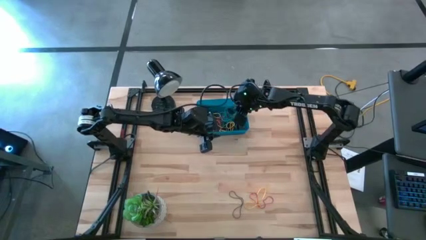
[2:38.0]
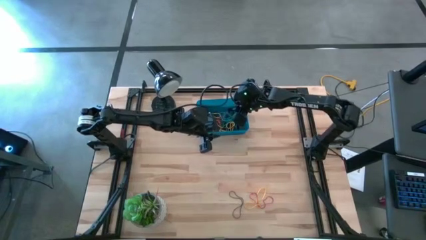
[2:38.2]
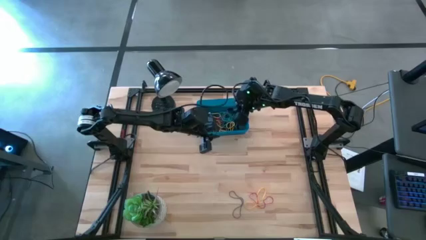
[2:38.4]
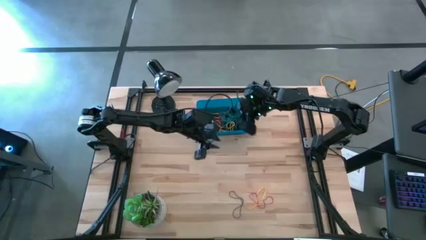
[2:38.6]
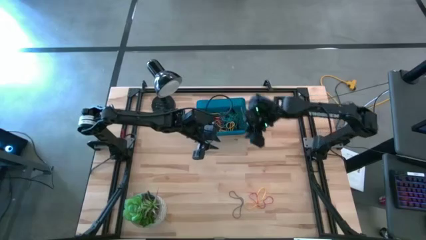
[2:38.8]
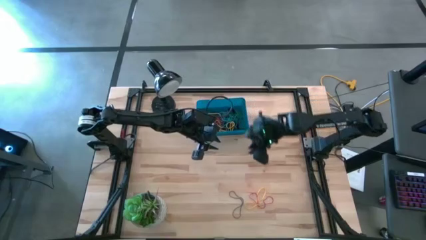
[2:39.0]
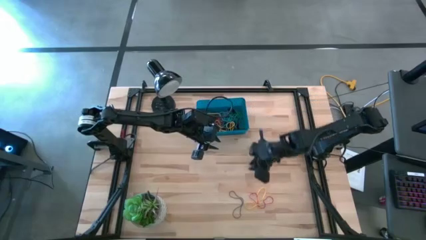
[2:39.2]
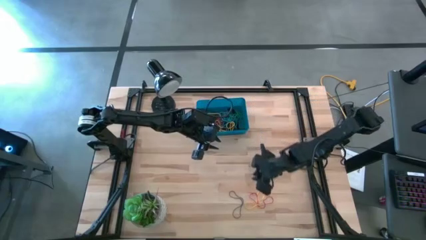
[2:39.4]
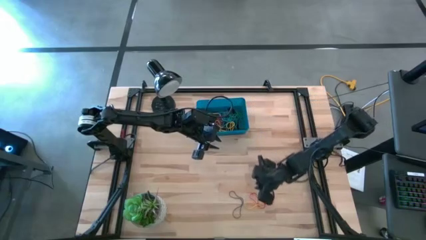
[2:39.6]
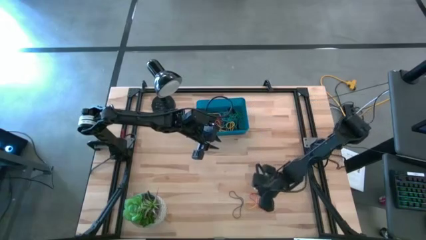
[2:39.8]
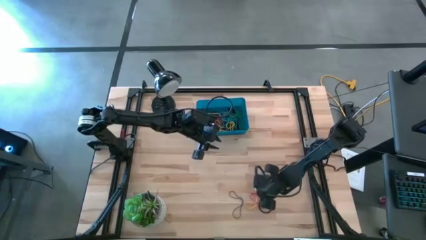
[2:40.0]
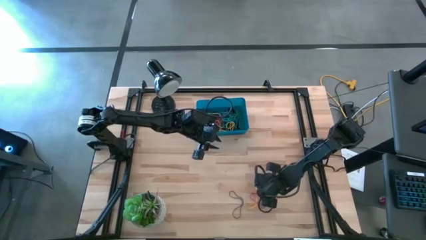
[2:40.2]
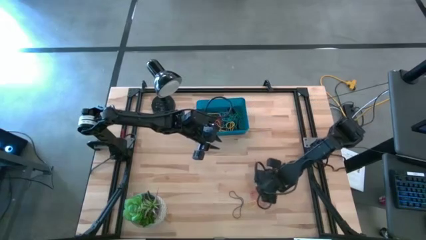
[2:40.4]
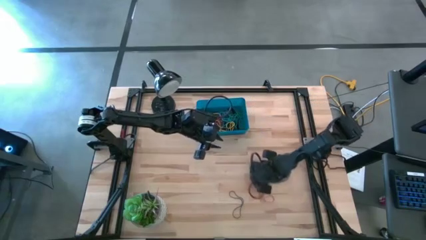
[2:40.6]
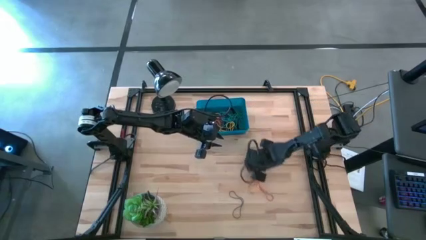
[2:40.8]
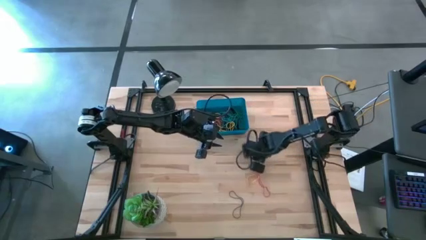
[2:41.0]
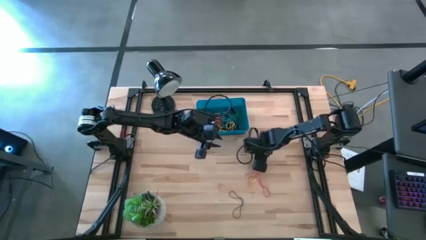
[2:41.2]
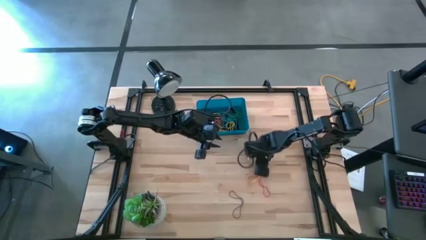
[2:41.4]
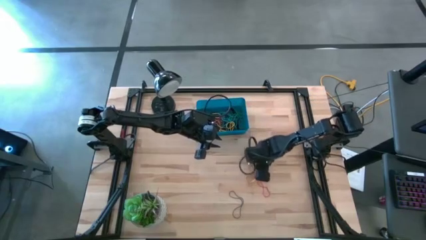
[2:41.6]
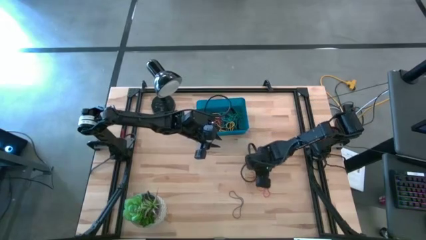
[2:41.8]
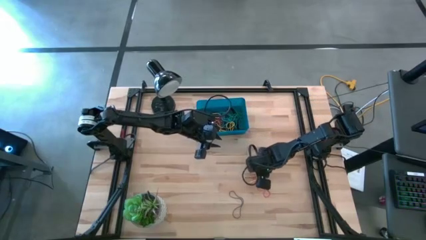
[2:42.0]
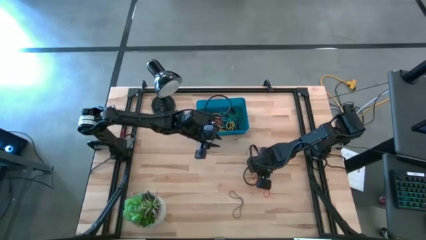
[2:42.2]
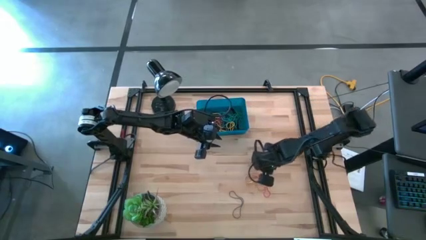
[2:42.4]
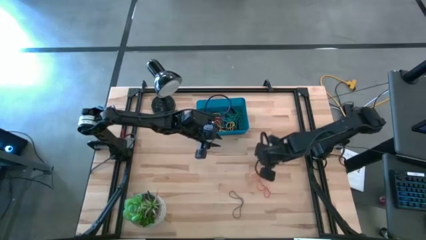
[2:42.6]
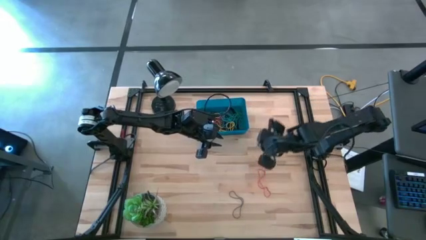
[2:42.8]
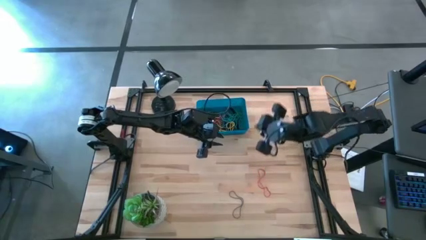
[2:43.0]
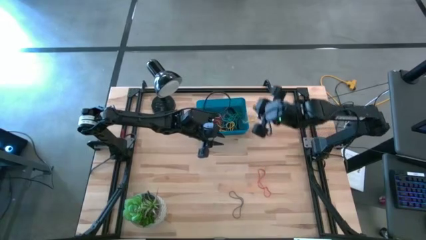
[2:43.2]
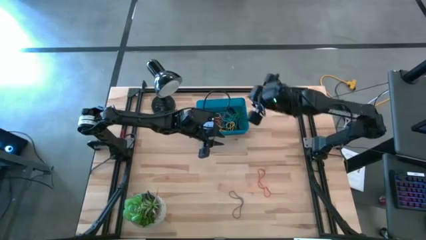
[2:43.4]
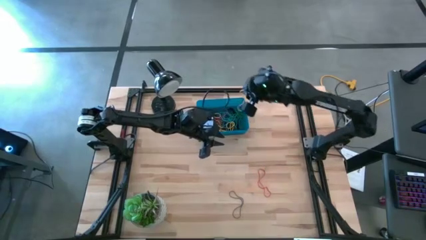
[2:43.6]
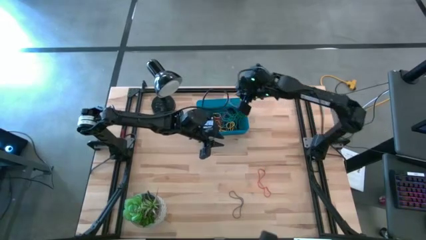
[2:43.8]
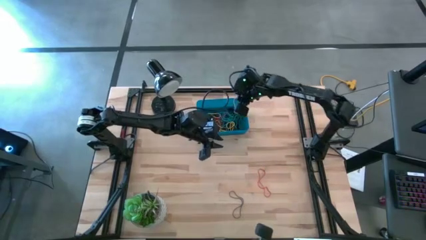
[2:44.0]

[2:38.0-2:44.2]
Task: Pick and place rubber bands into bin
Put the yellow rubber band into the blue bin

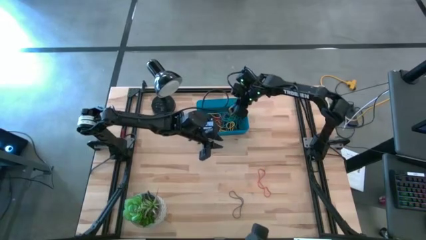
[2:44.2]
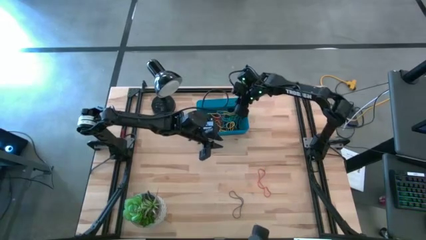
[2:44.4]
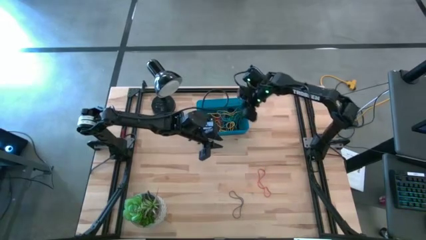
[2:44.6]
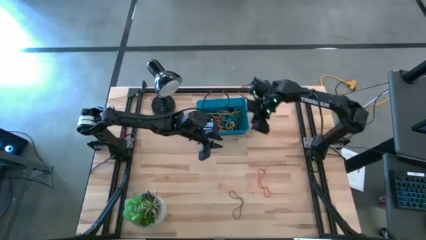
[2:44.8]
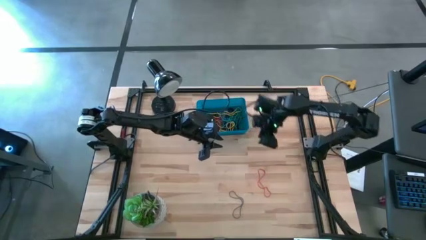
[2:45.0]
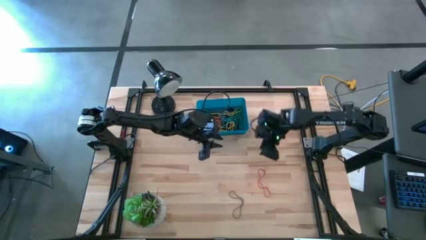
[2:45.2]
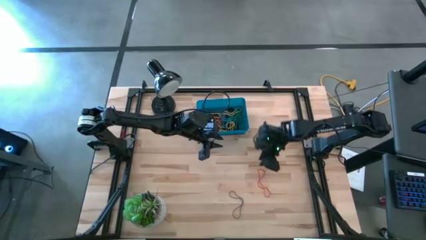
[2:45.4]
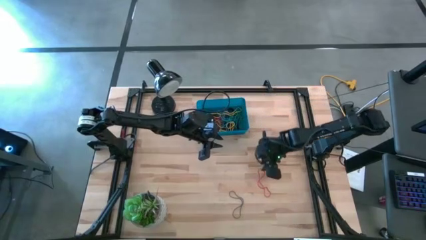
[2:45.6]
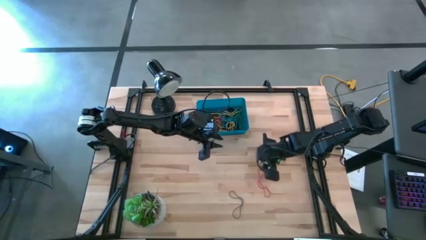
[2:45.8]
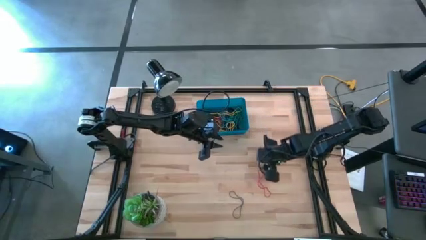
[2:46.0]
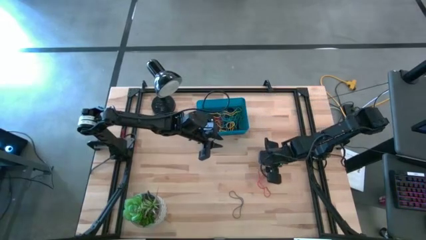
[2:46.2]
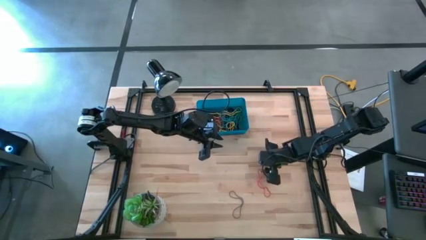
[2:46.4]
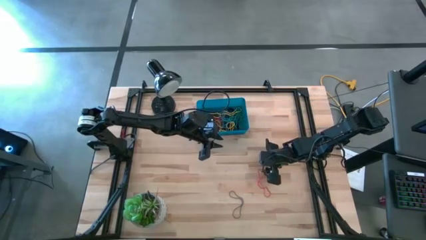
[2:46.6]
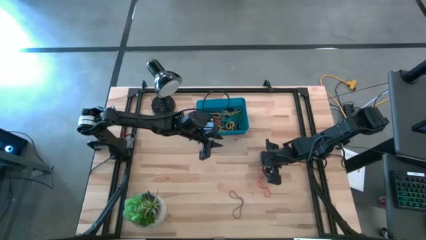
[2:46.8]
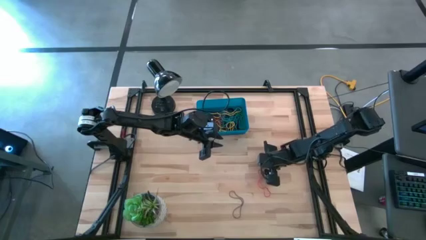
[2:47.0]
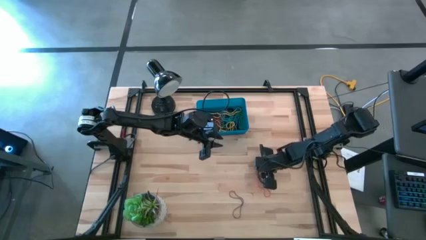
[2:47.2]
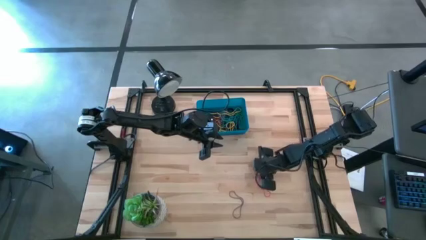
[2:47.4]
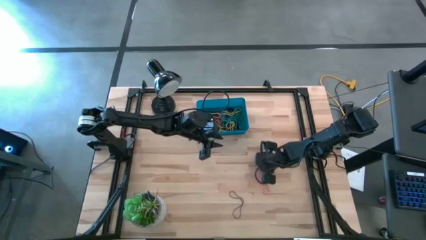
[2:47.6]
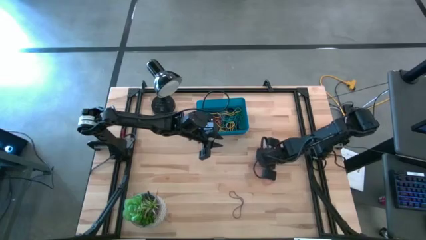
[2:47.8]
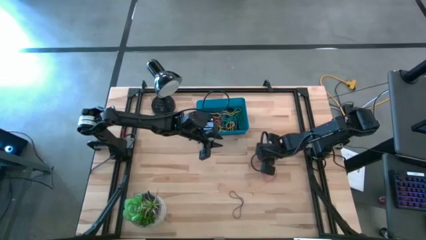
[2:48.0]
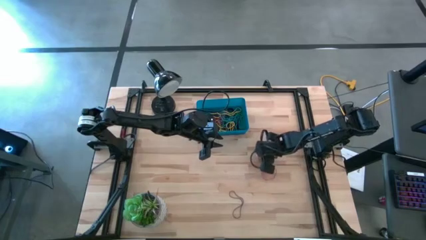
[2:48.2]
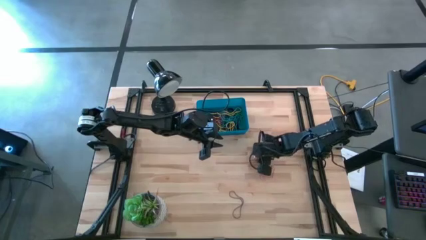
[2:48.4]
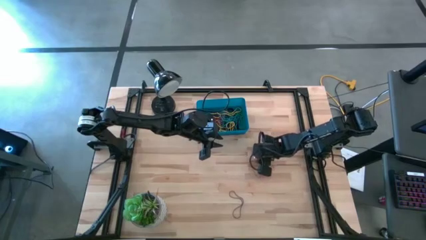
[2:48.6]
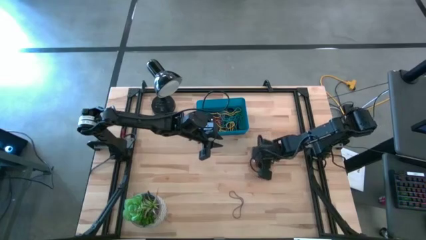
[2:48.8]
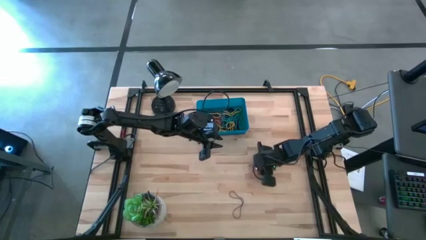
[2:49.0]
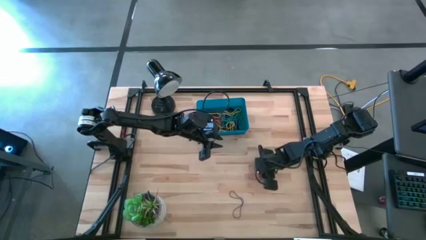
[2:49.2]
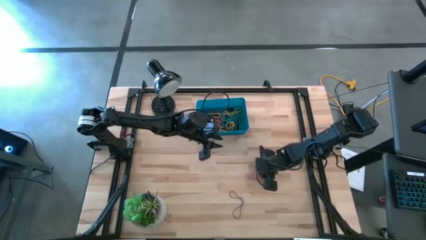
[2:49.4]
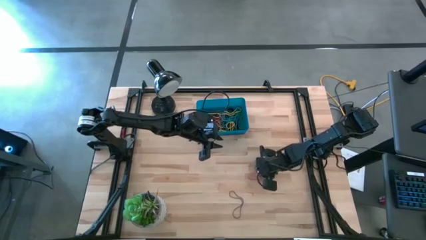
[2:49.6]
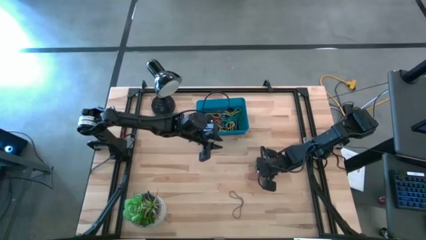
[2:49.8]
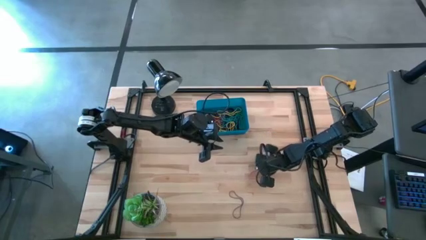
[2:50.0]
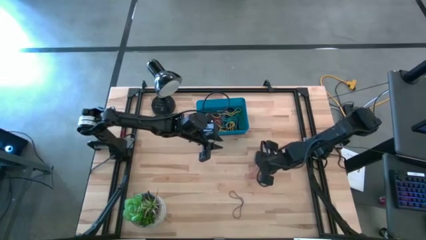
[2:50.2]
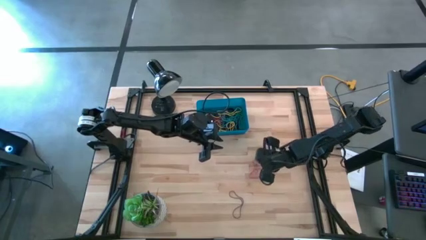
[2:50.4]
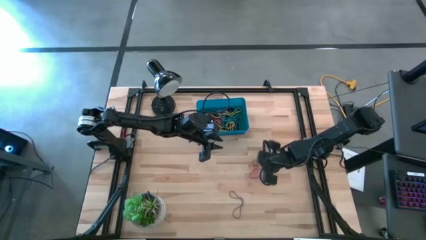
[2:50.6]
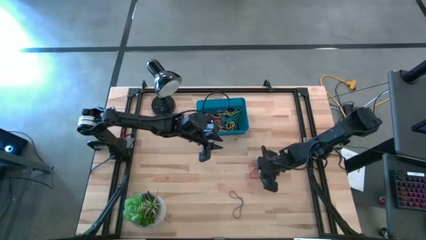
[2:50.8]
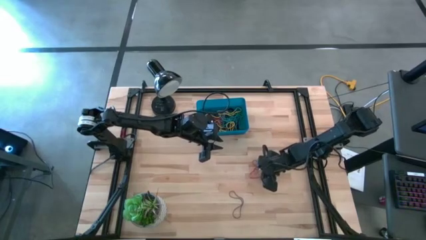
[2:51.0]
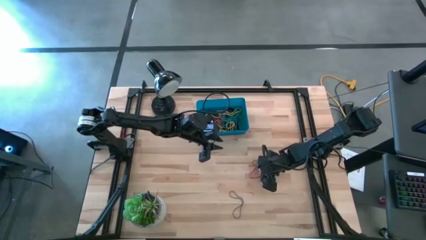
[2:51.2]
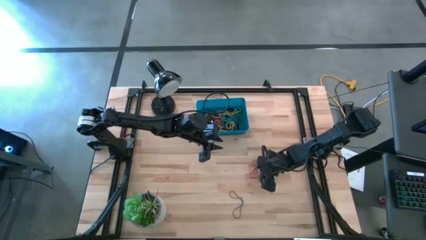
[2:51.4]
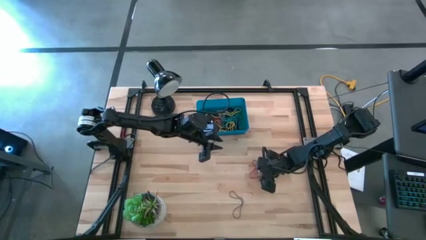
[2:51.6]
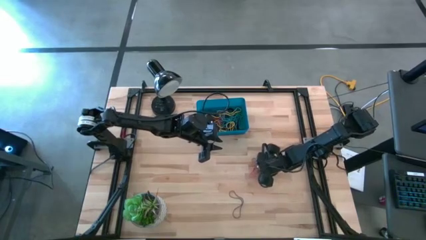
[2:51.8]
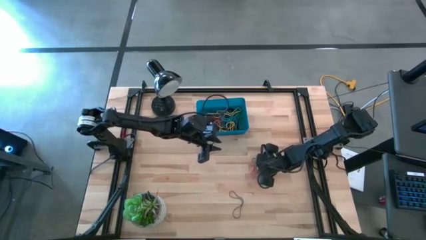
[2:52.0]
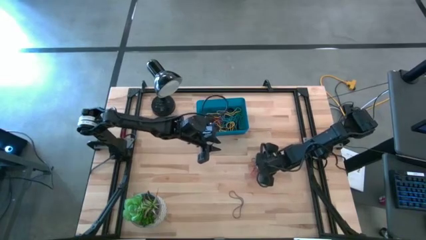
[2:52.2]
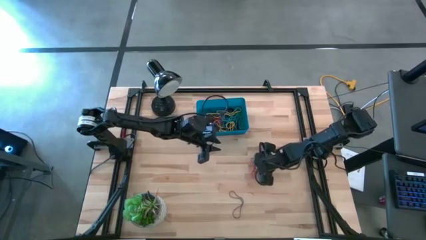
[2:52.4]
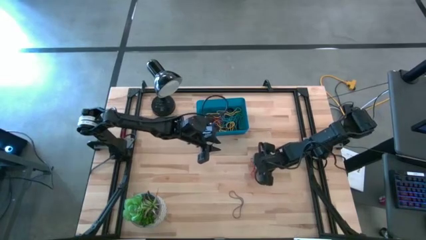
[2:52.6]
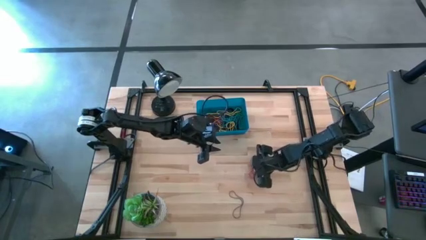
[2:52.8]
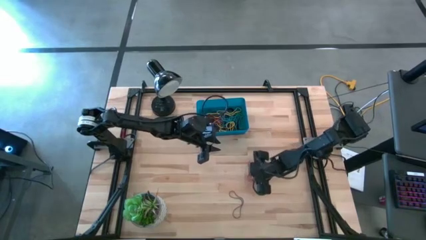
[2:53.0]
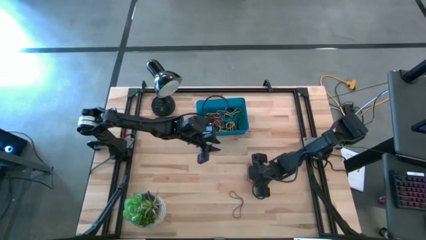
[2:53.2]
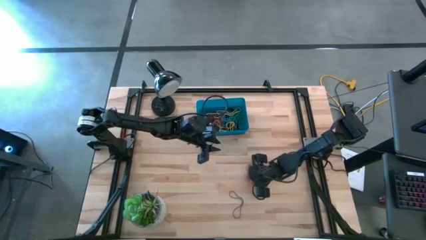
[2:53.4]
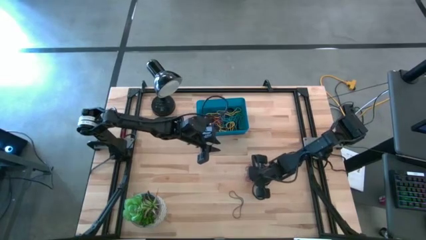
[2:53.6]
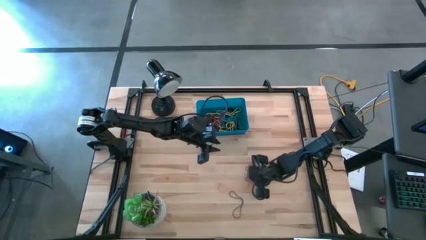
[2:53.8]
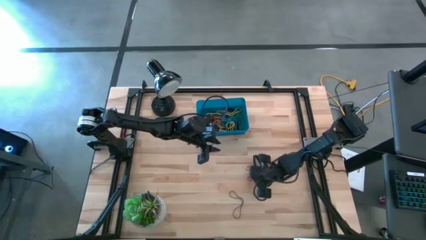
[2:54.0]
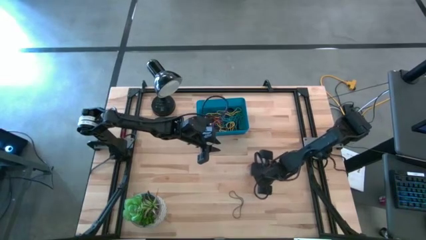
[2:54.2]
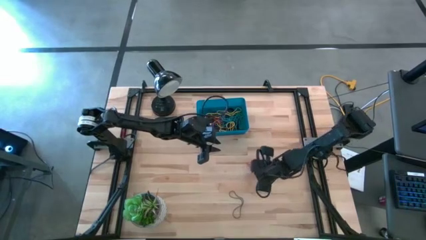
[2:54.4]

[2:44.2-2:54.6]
Put the red rubber band into the blue bin
